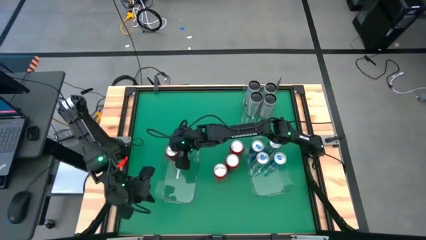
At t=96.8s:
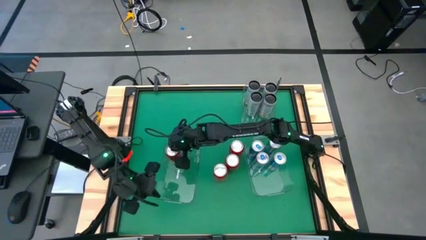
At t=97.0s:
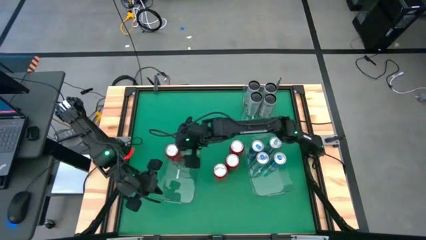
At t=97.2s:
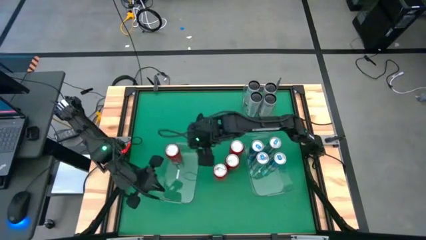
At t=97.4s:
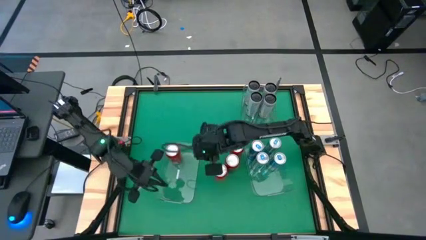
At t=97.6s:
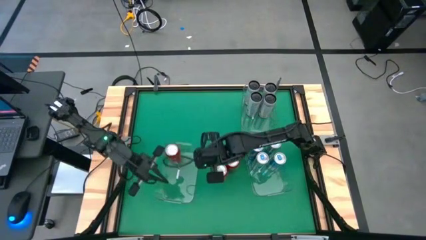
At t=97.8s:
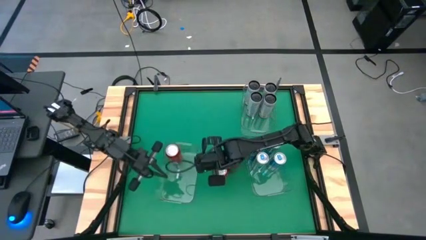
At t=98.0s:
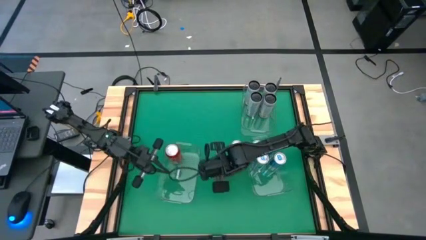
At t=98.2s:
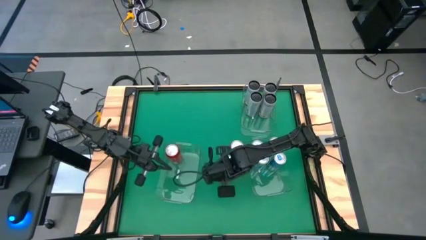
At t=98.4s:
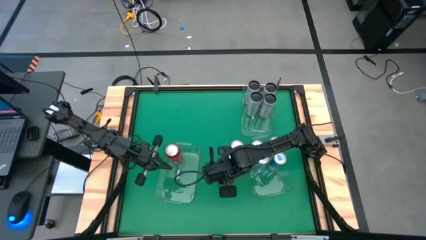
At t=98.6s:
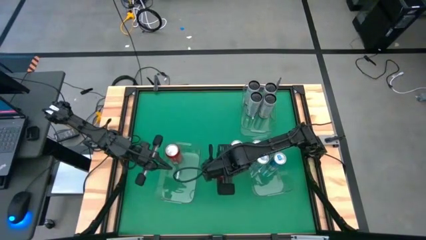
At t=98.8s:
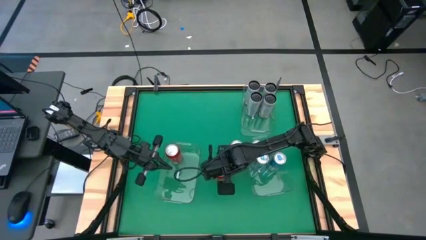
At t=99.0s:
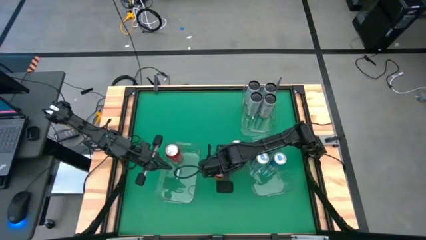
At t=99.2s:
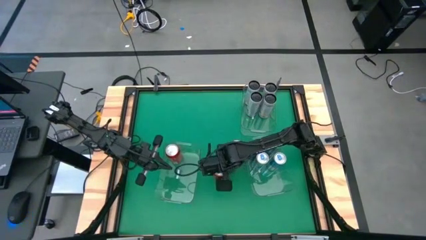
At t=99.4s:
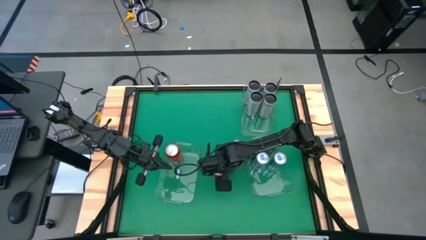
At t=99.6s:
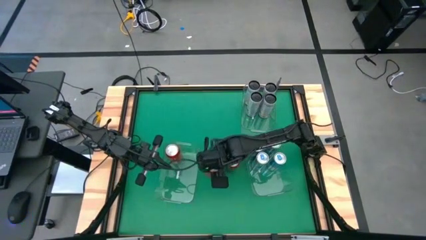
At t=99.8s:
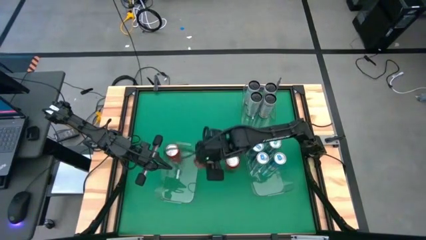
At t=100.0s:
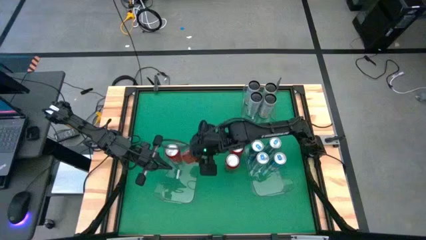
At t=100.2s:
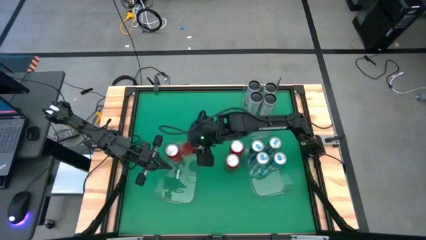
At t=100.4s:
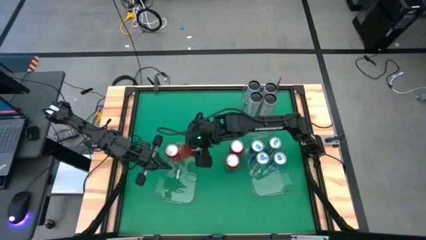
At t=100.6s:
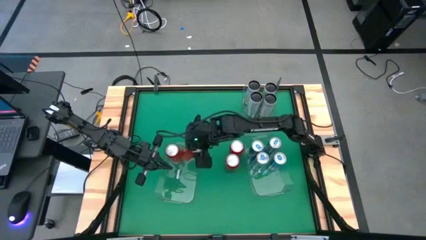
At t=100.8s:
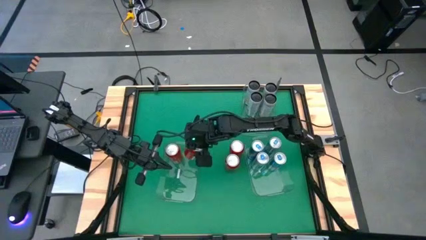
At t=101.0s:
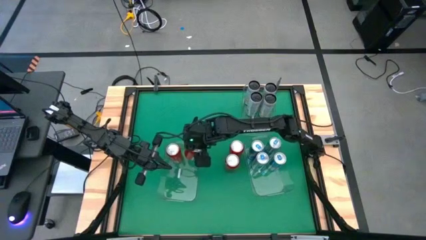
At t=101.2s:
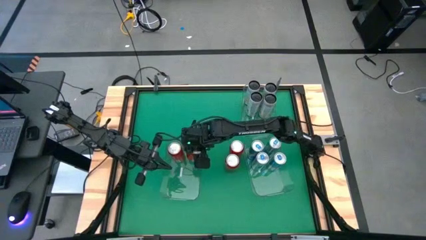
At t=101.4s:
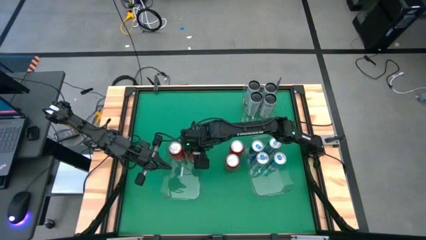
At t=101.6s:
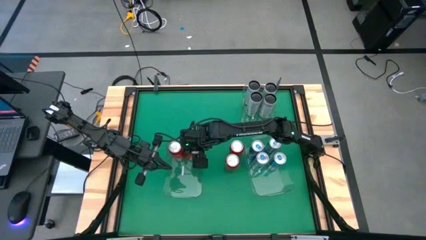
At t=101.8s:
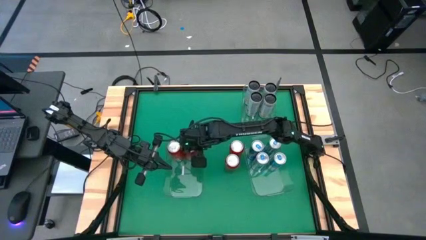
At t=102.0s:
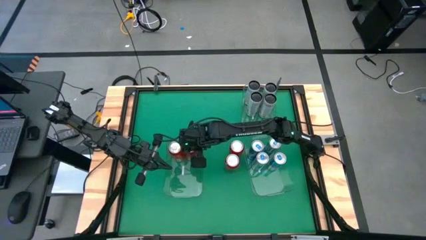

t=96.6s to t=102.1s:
Task: Sort soda cans
Put the red soda can into the bottom left transparent bin

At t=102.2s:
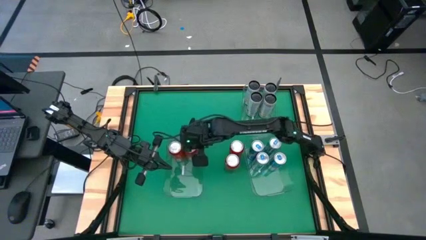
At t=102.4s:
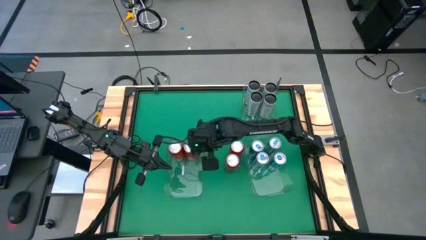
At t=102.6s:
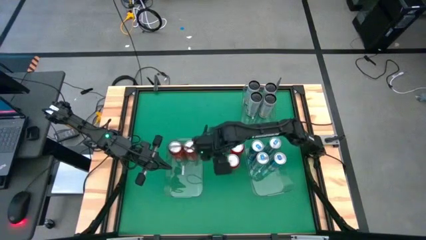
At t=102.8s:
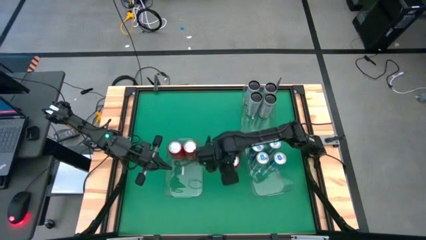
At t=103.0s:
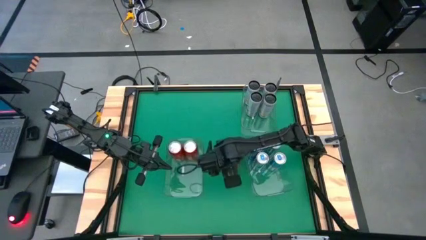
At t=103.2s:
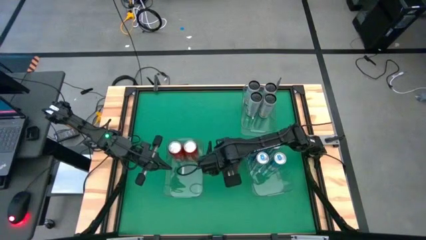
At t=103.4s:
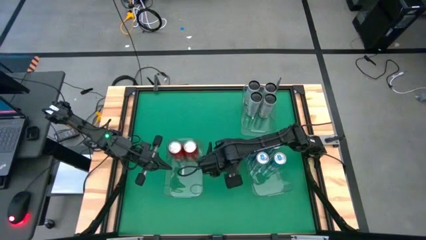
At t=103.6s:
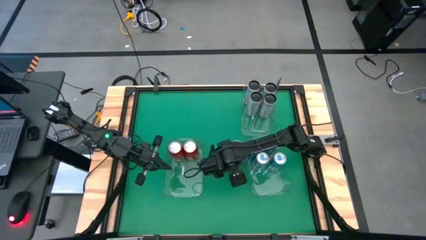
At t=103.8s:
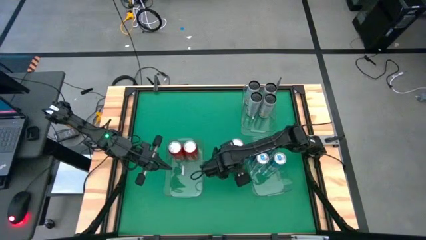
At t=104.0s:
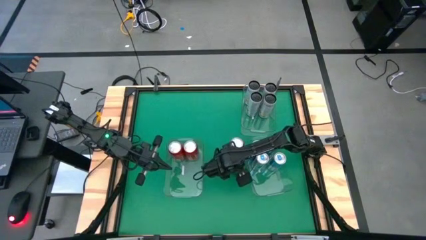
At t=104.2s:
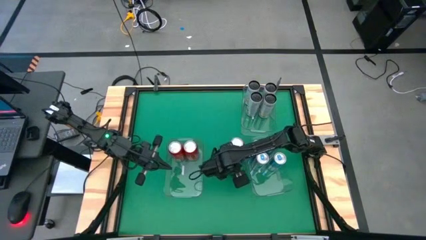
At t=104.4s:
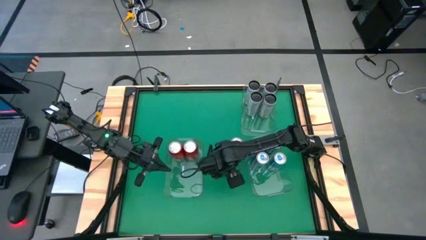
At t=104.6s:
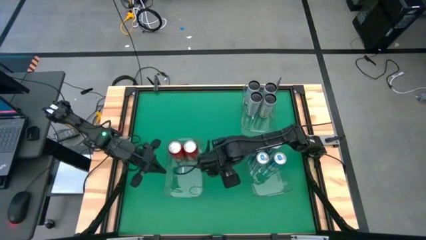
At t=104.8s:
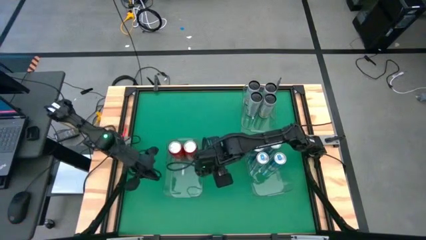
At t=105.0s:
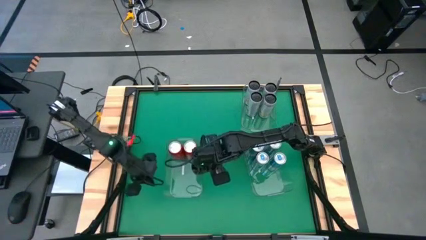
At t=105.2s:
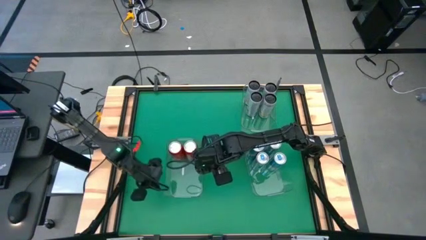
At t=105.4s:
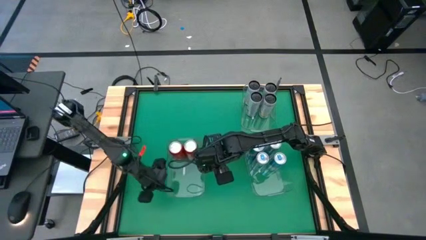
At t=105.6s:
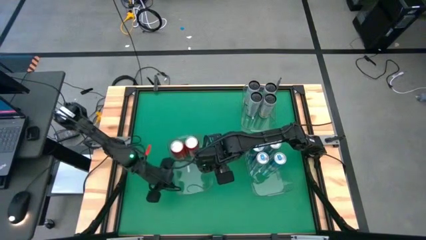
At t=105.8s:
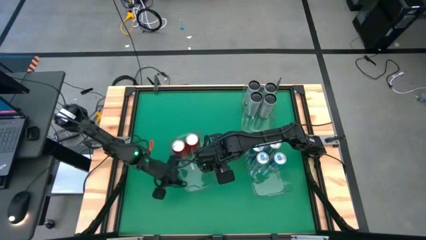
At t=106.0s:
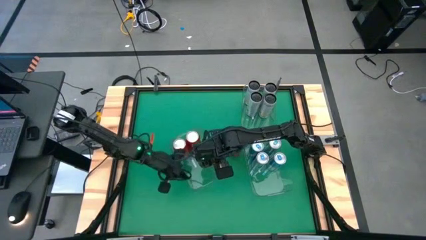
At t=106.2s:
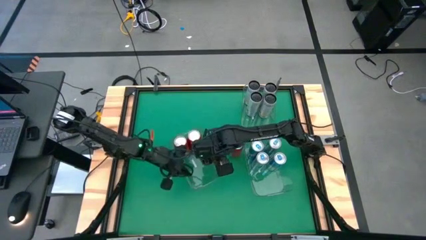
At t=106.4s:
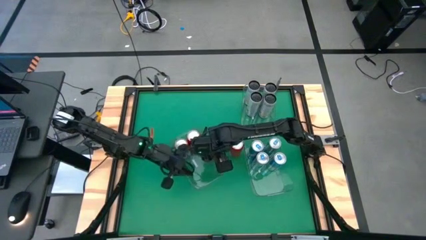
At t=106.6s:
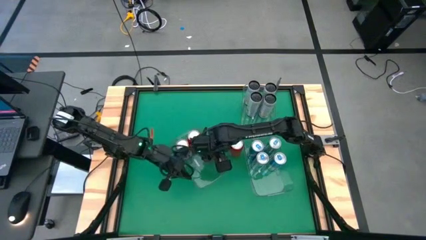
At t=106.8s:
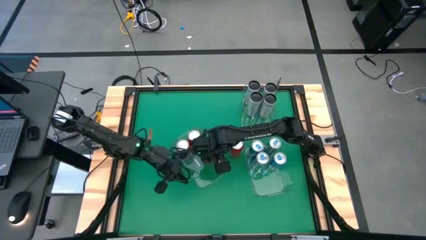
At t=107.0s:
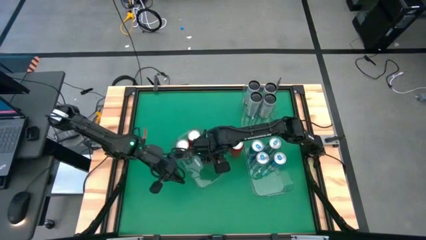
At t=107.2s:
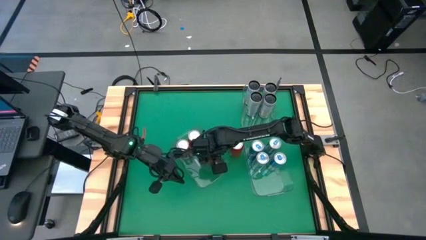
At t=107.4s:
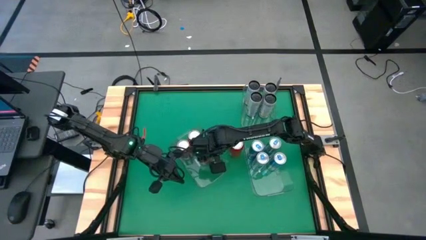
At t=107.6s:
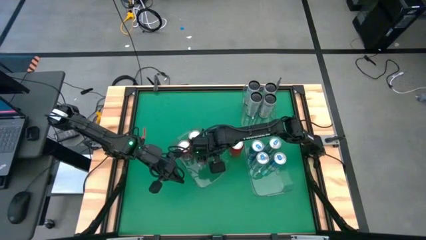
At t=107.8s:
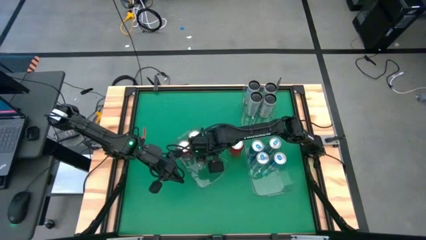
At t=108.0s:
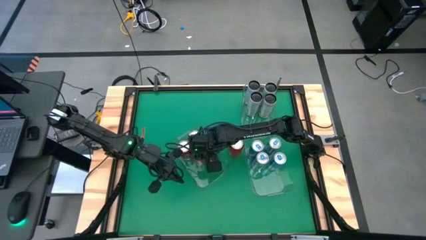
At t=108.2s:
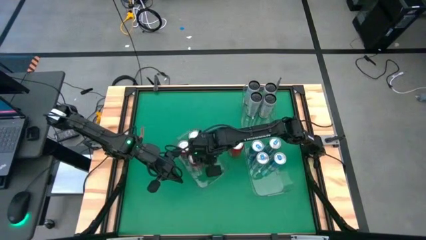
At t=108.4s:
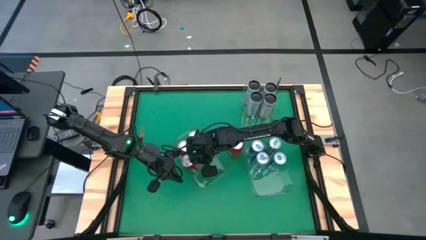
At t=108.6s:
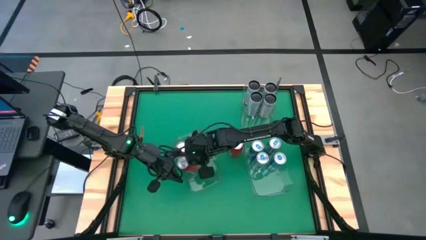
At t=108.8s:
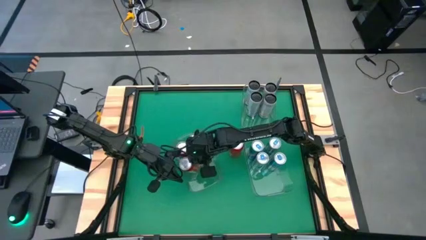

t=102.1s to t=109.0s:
Put the red soda can into the bottom left transparent bin

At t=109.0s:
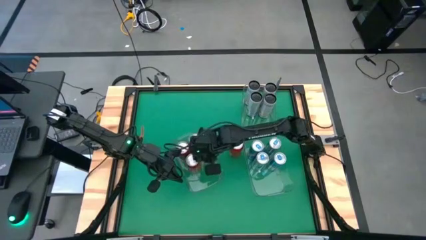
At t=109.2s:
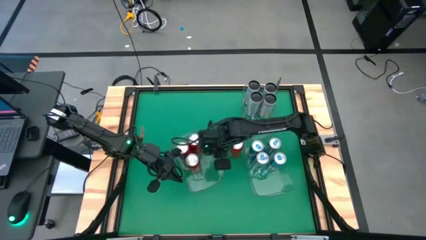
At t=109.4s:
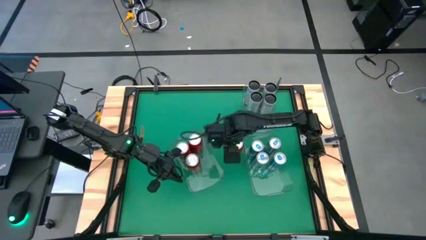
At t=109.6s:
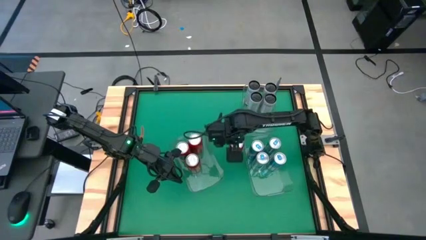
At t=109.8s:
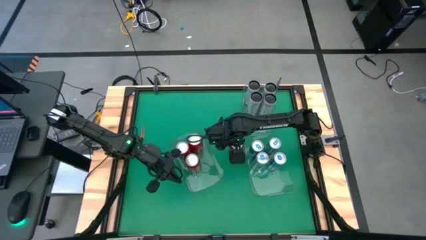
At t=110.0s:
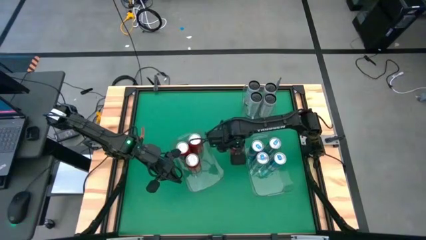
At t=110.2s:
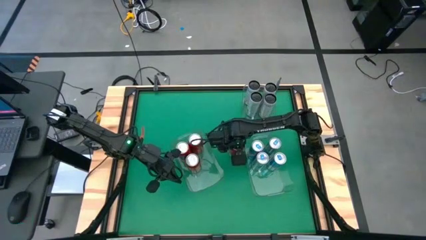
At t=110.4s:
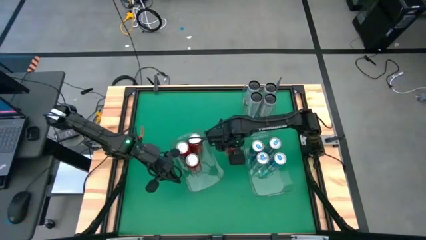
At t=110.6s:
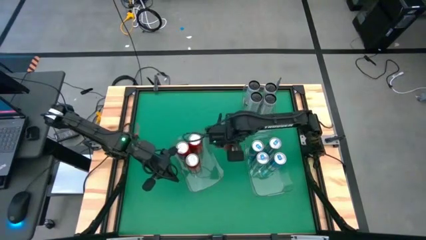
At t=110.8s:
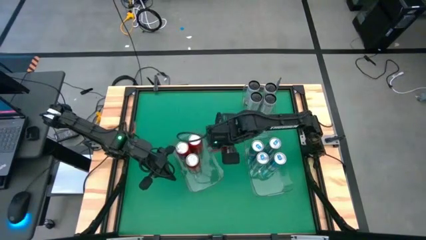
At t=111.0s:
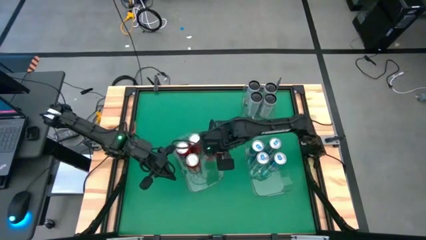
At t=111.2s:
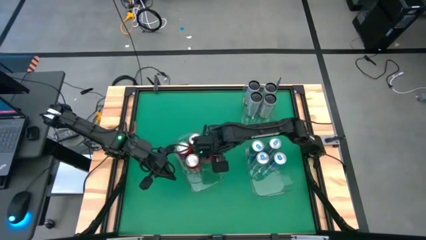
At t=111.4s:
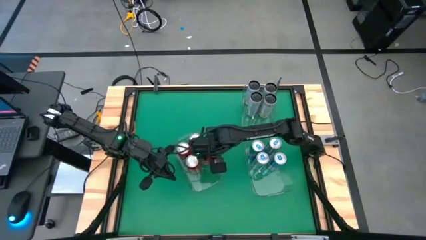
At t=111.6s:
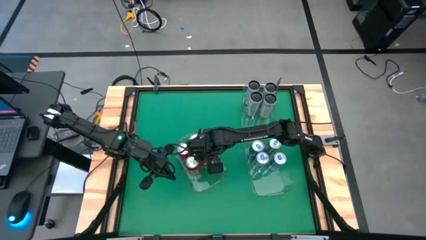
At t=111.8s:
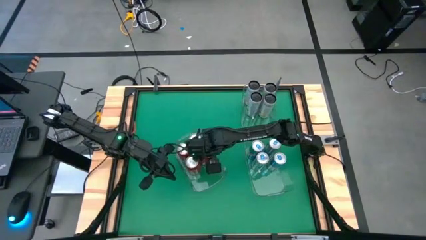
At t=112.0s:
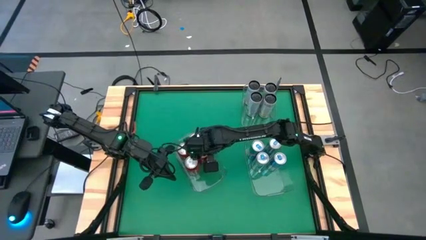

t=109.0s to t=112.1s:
Put the red soda can into the bottom left transparent bin

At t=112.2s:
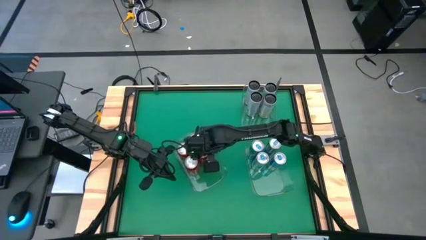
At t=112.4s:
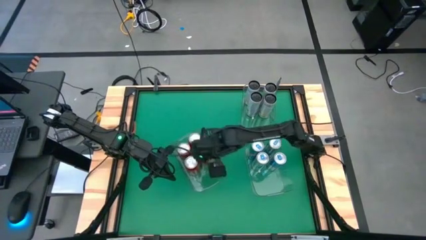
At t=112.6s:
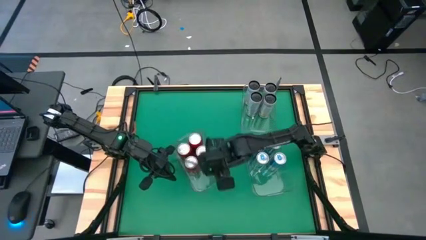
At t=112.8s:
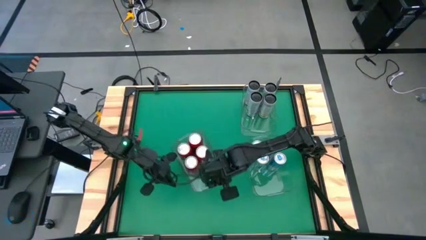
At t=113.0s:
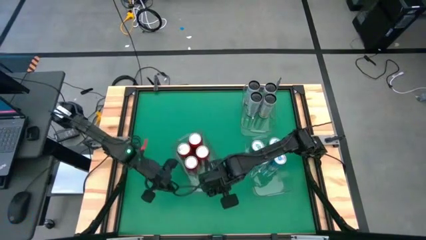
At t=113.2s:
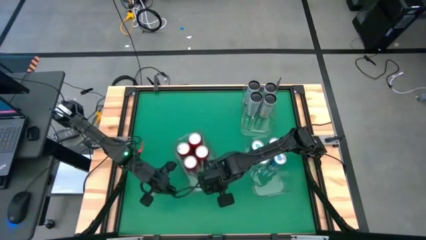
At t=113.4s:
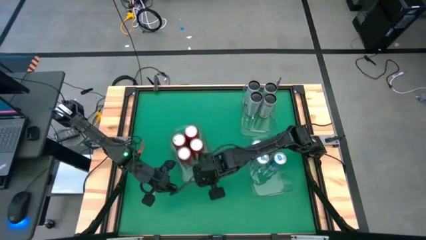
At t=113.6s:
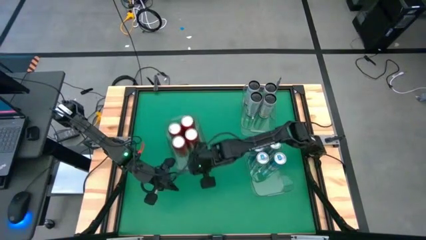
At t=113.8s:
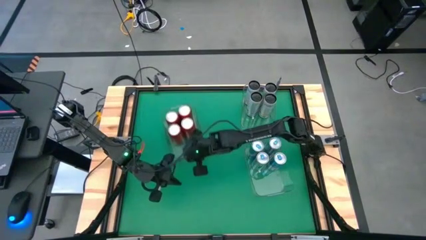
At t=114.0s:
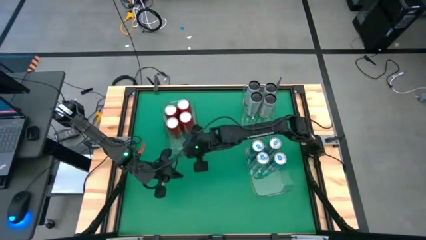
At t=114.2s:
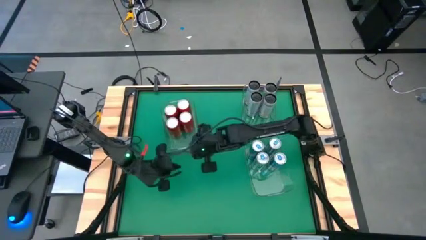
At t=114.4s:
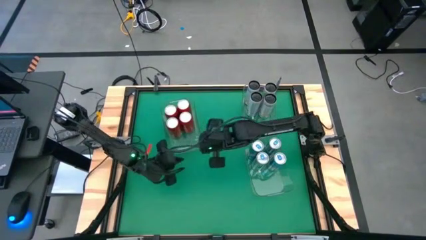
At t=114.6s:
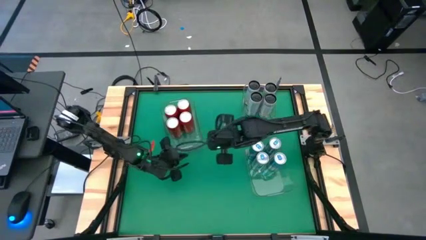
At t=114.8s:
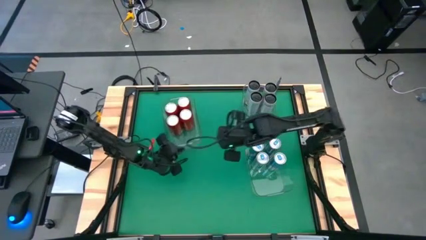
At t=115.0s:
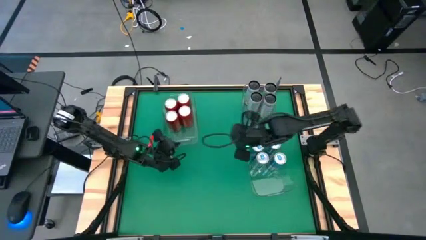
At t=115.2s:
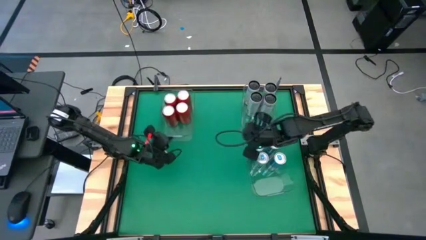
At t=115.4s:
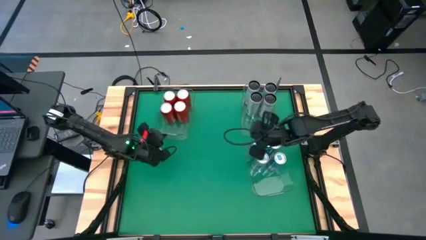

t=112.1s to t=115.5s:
Move the bottom left transparent bin to the top right of the table
